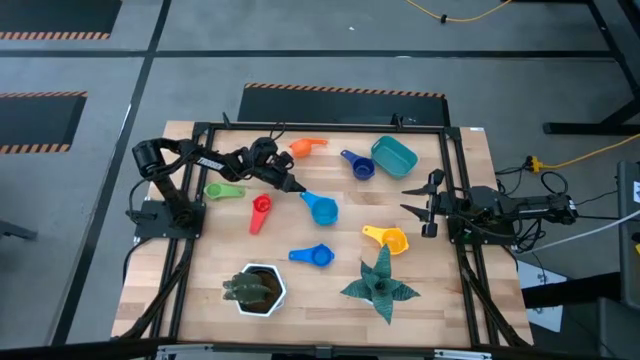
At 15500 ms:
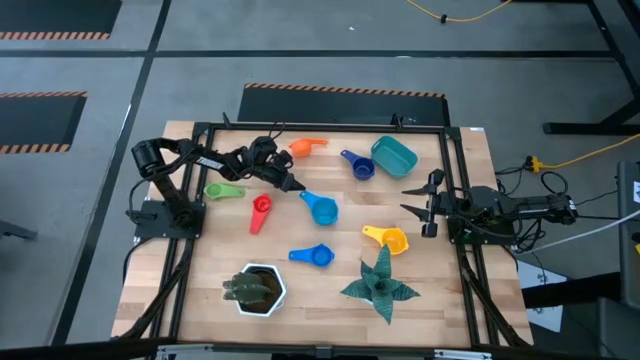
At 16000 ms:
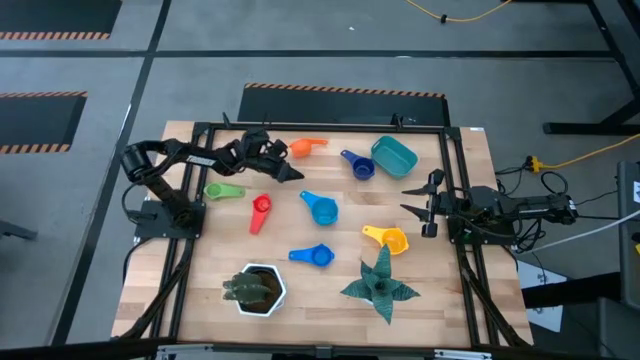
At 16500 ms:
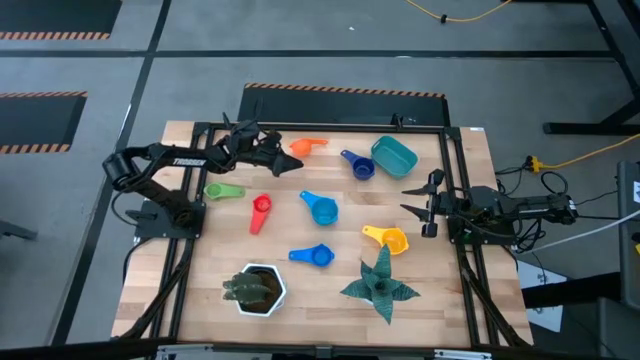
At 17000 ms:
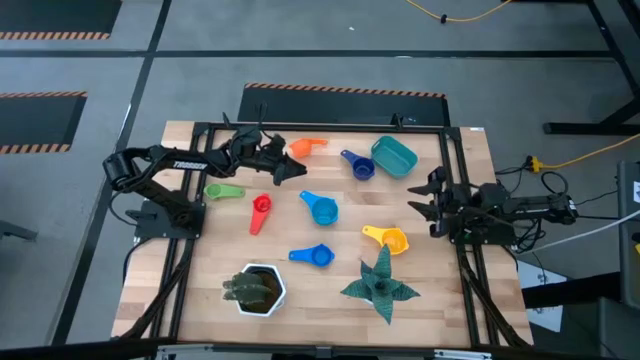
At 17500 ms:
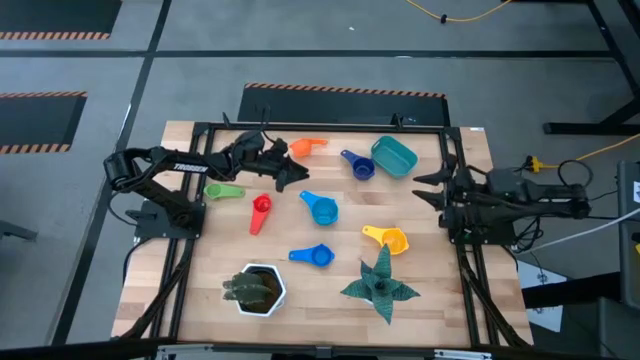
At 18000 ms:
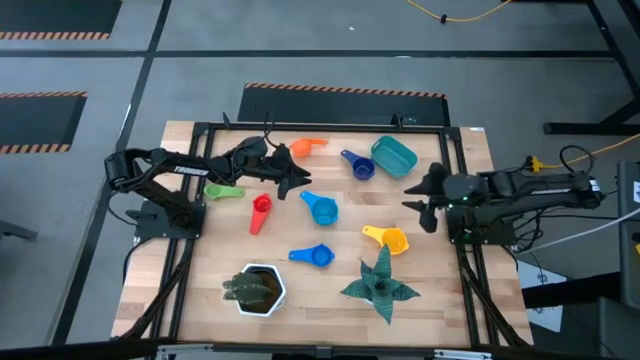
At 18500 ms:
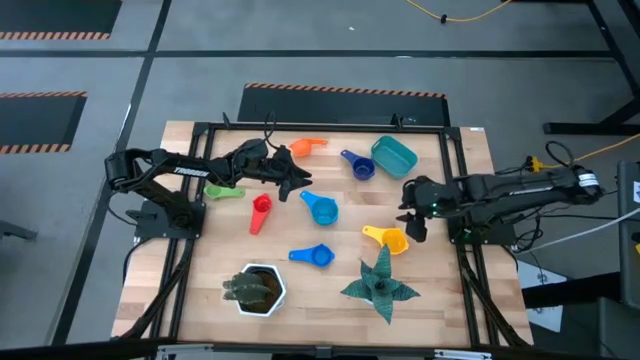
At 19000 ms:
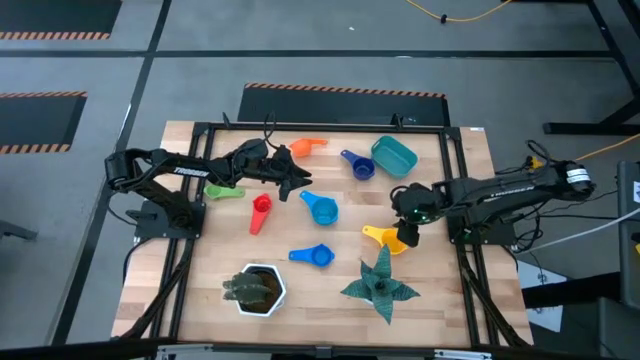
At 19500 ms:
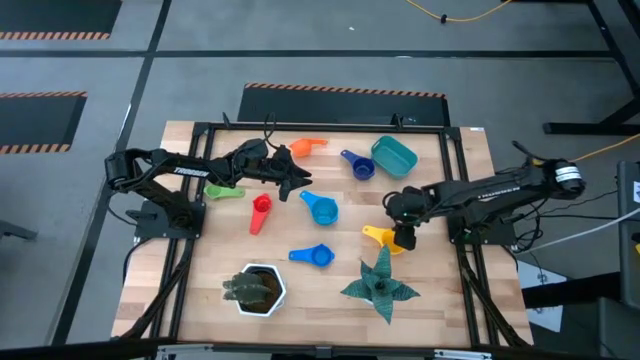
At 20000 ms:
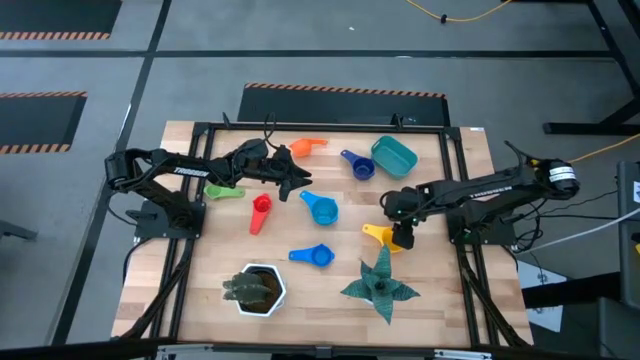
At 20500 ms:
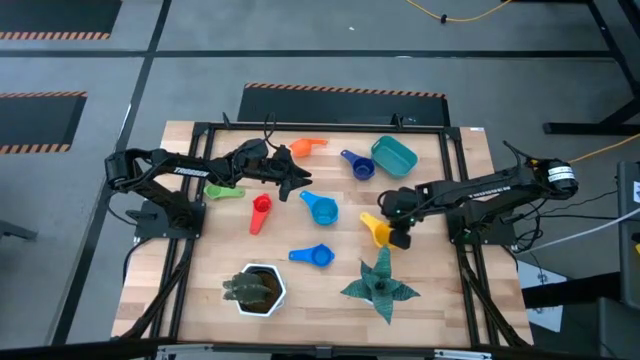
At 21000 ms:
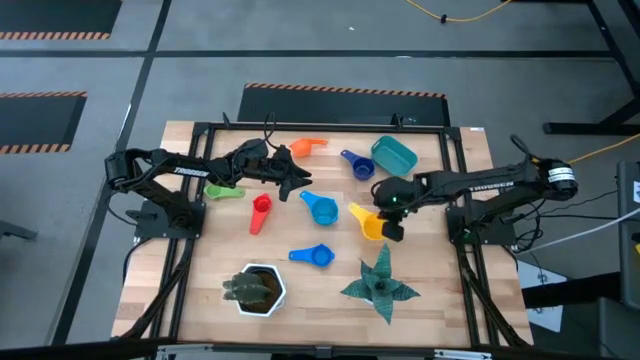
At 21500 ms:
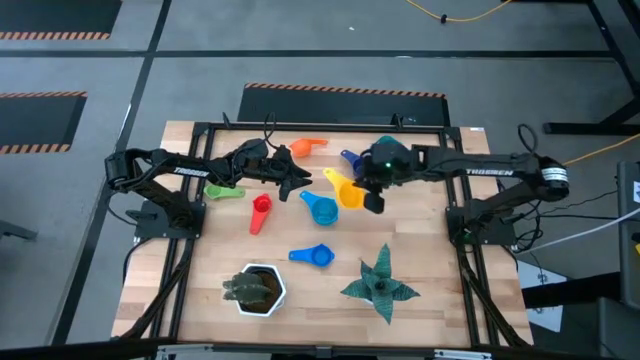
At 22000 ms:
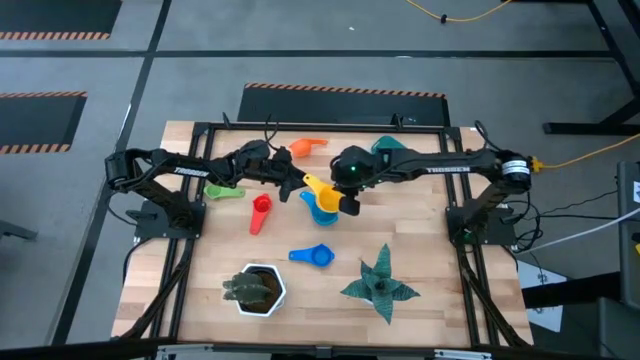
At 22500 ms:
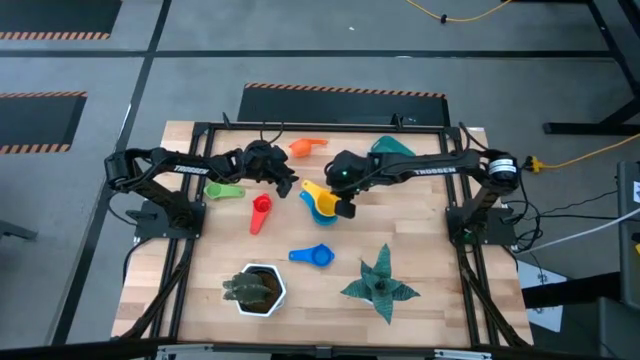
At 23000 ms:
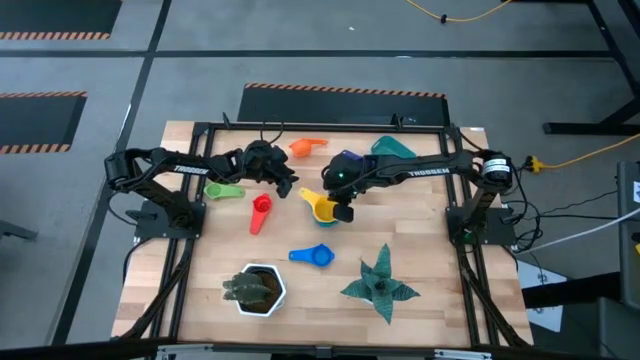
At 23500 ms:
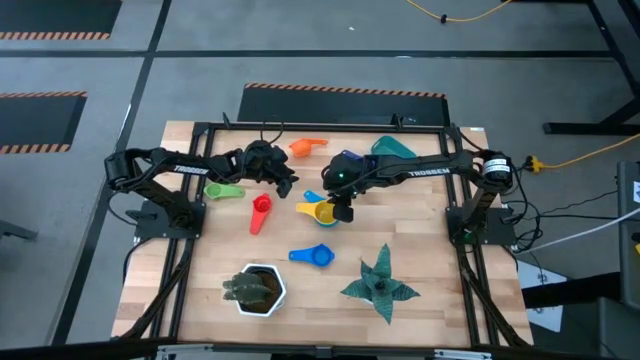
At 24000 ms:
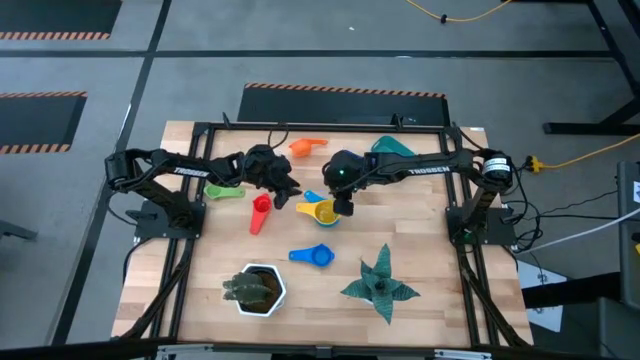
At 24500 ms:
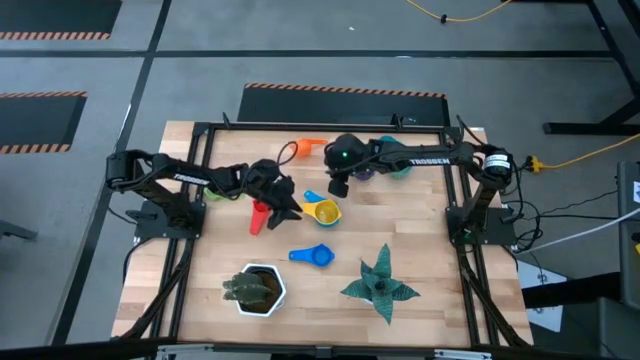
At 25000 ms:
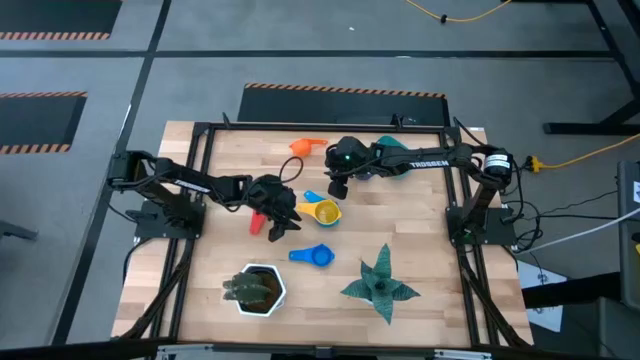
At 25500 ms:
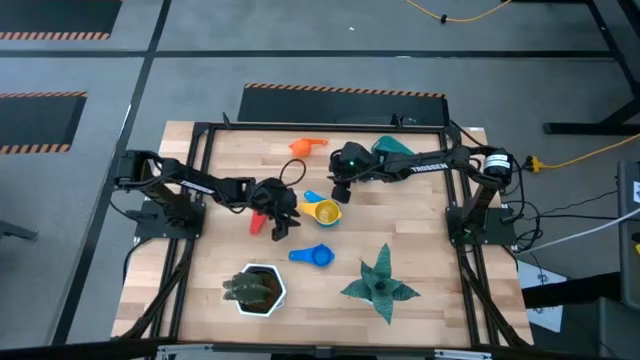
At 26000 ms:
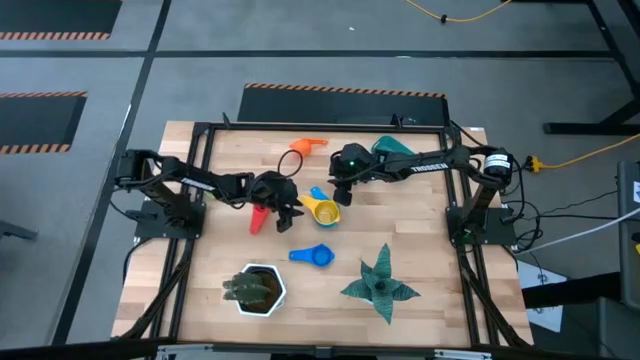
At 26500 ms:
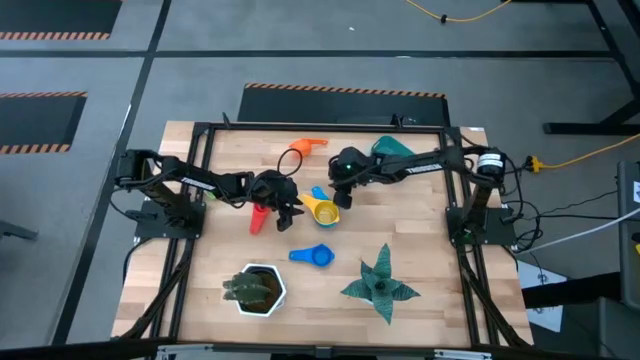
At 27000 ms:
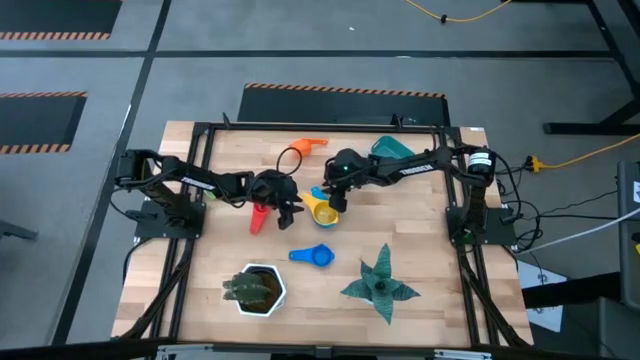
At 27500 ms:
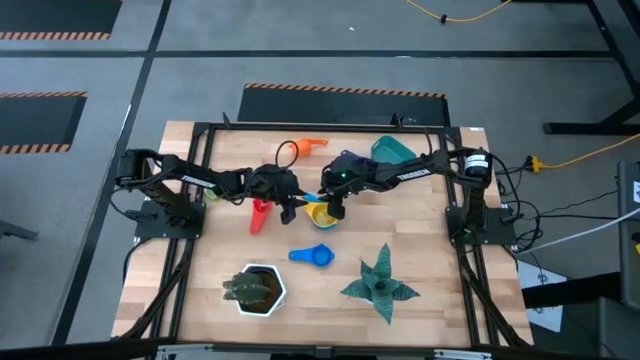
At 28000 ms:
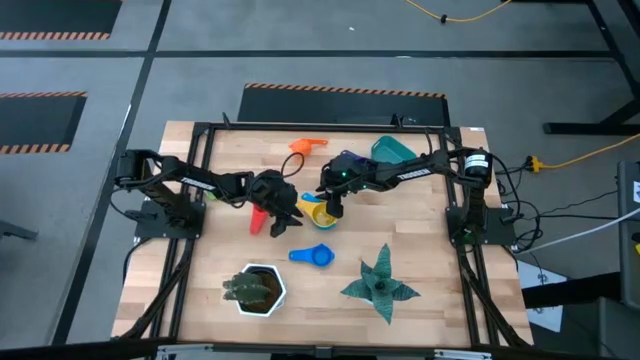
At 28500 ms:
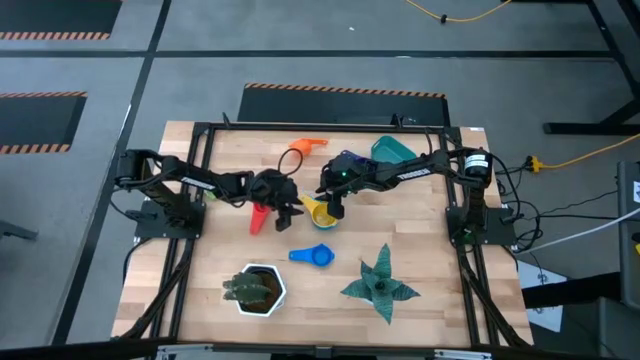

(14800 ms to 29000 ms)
Task: Nest measuring cups in basket
Stack the yellow measuring cup on top of the light blue measuring cup

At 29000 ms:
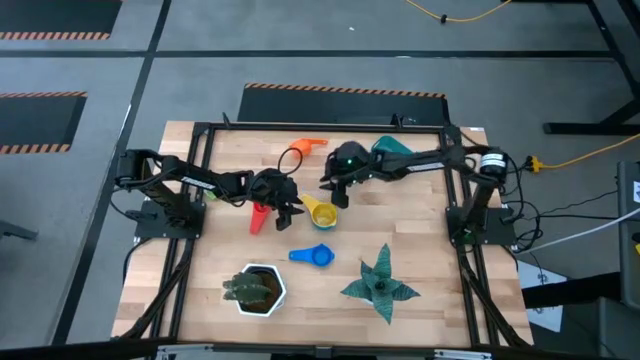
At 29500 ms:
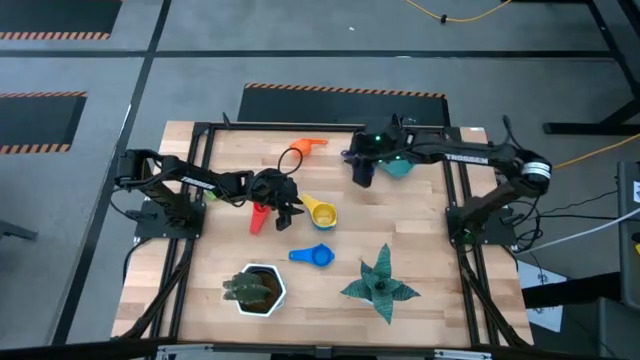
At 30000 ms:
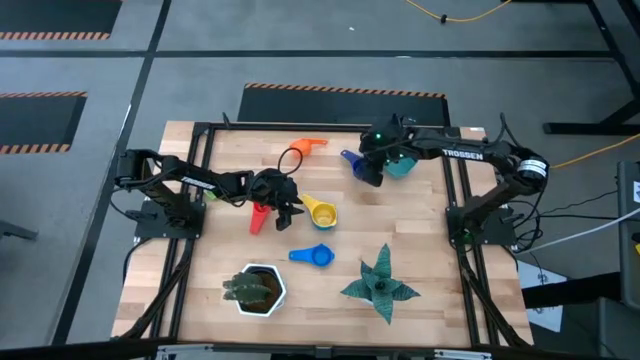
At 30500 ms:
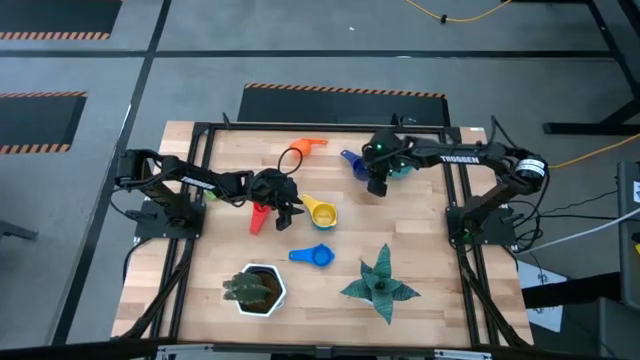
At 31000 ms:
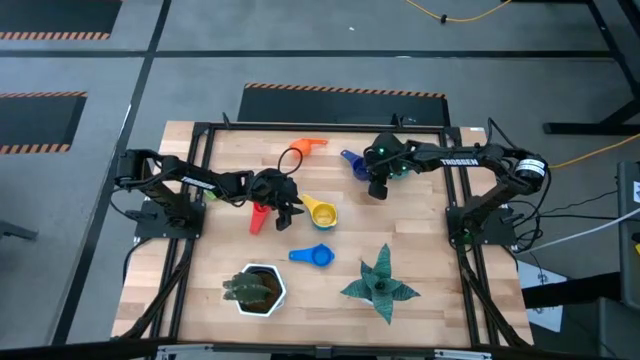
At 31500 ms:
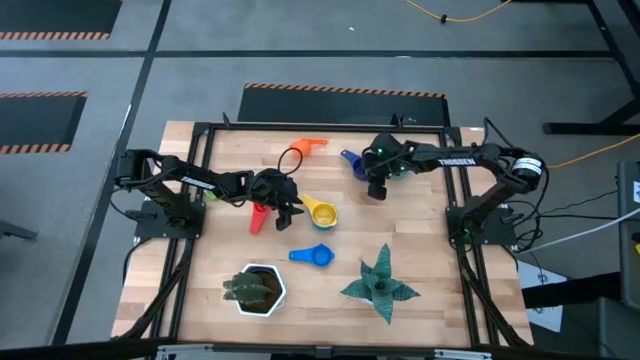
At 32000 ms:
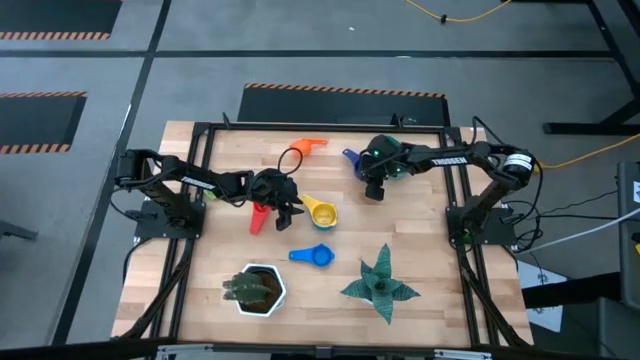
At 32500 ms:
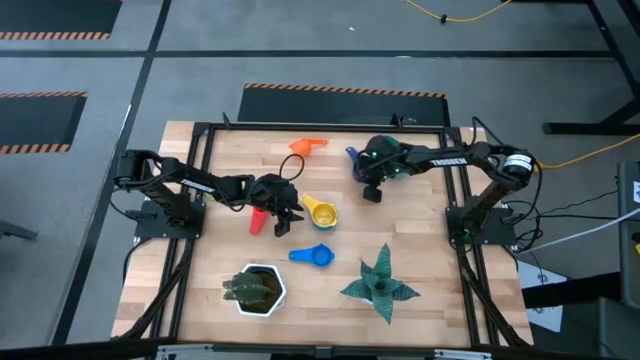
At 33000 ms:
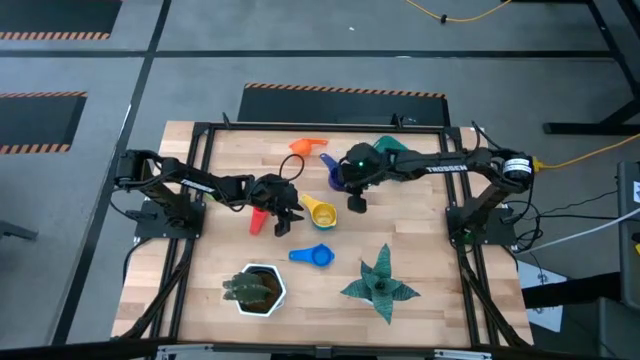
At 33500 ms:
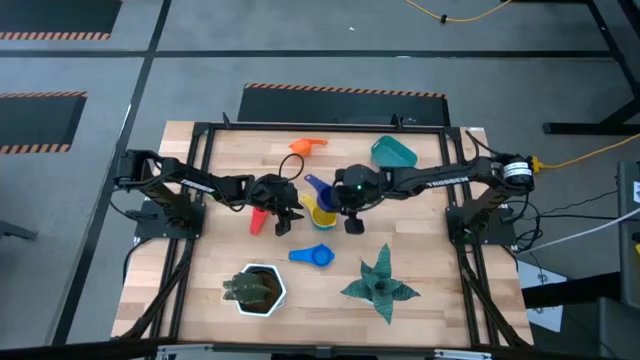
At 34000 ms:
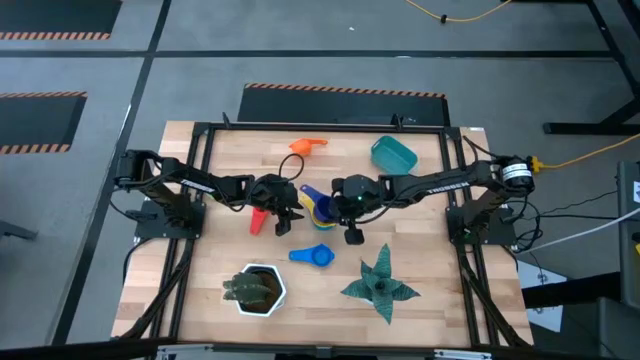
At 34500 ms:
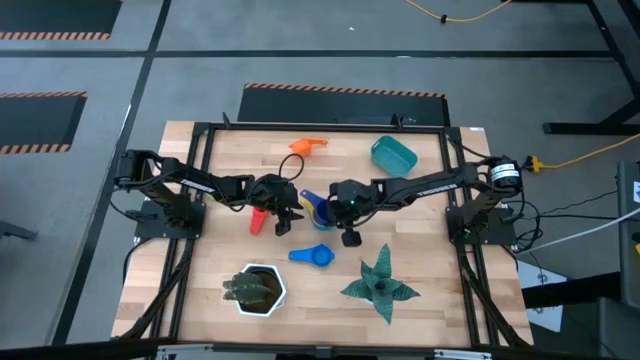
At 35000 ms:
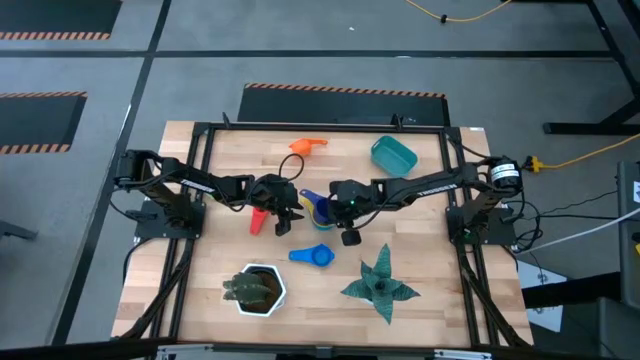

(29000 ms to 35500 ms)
Stack the dark blue measuring cup on top of the yellow measuring cup

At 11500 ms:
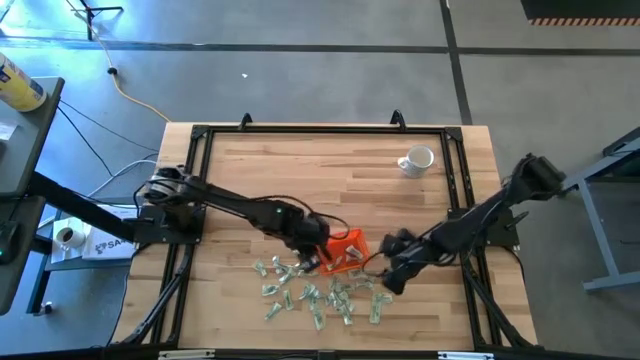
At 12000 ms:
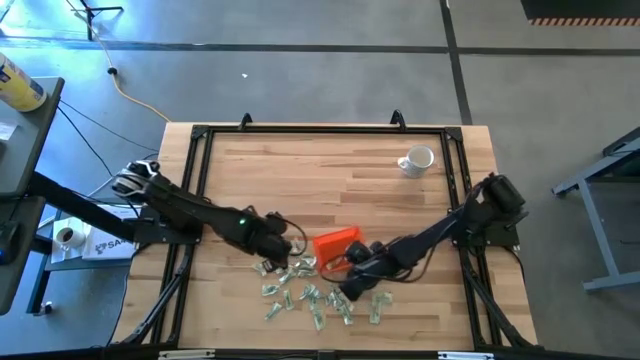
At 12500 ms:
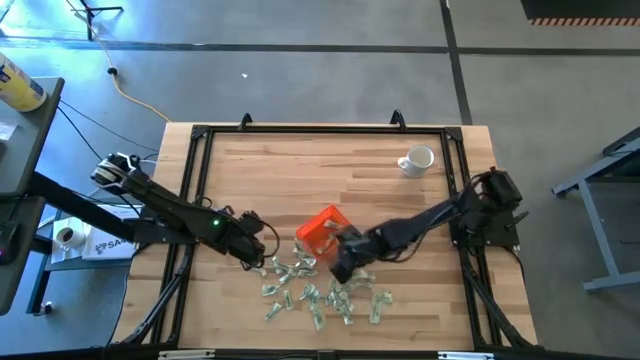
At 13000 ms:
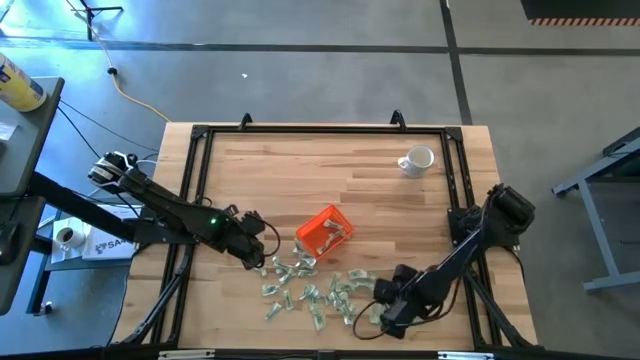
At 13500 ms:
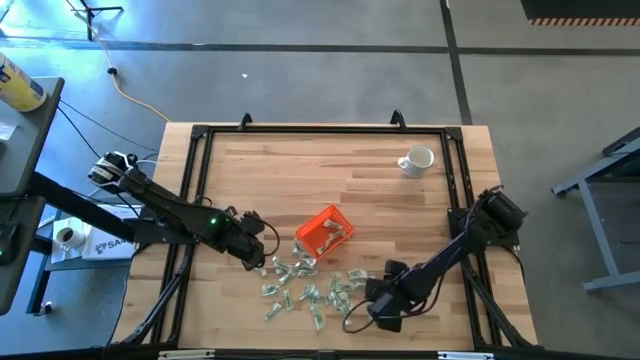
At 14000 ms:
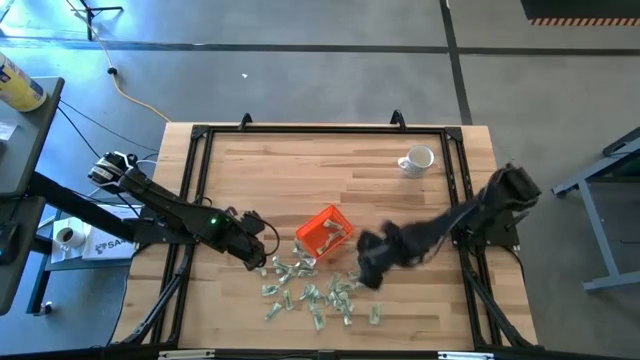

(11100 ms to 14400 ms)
Task: Pick and place Stevia / Truvia into bins
Put the stevia packet into the orange bin
